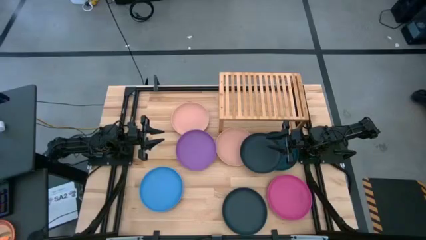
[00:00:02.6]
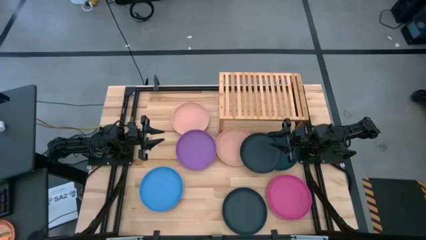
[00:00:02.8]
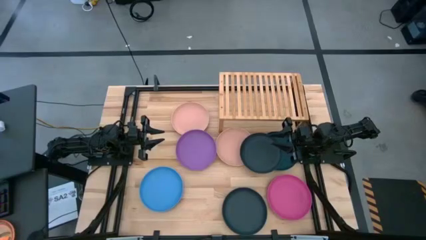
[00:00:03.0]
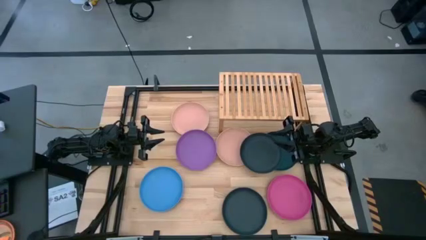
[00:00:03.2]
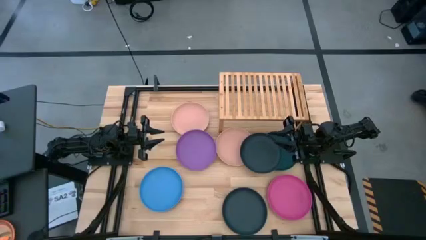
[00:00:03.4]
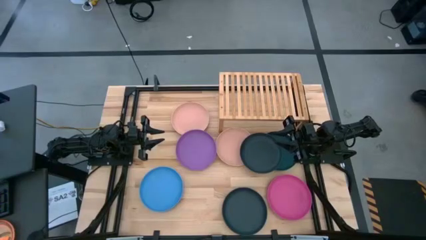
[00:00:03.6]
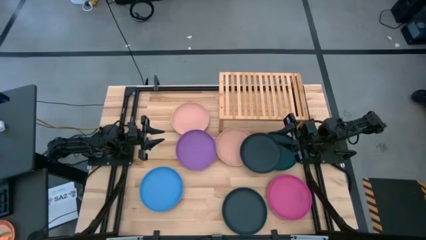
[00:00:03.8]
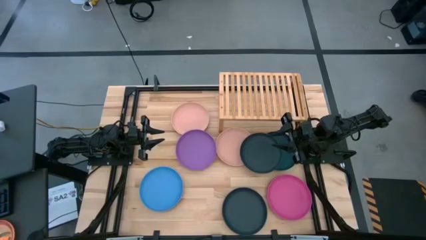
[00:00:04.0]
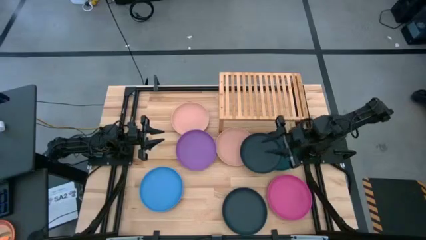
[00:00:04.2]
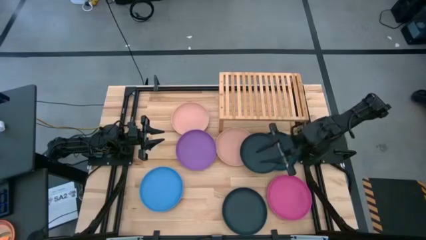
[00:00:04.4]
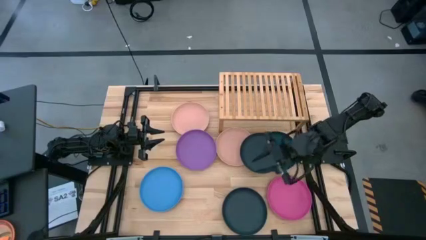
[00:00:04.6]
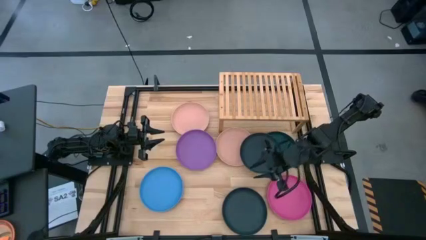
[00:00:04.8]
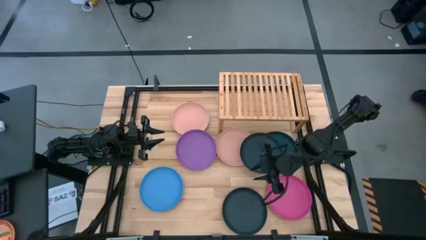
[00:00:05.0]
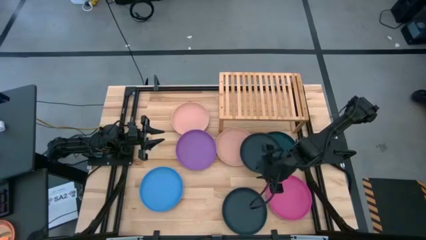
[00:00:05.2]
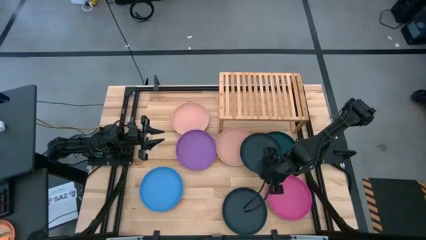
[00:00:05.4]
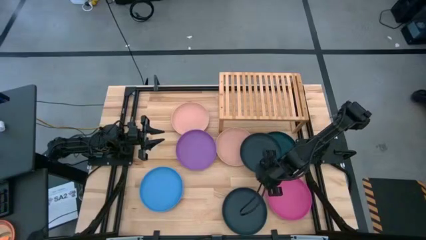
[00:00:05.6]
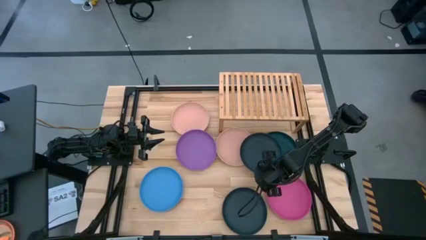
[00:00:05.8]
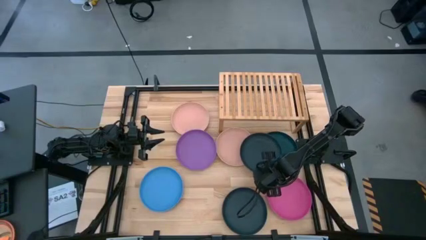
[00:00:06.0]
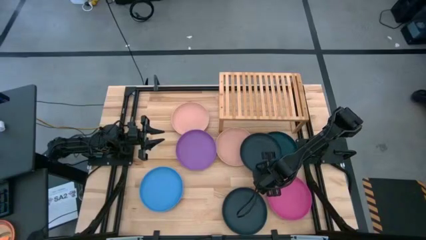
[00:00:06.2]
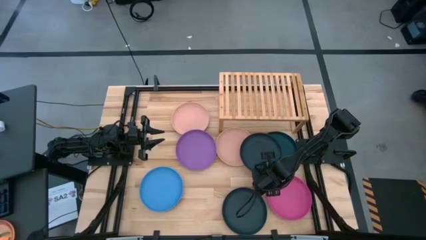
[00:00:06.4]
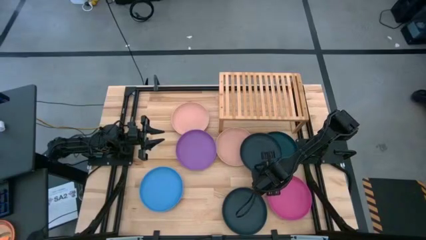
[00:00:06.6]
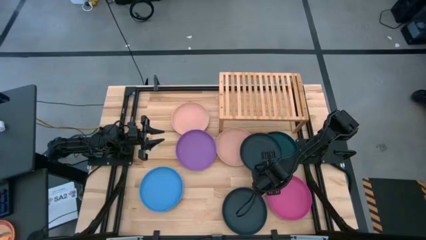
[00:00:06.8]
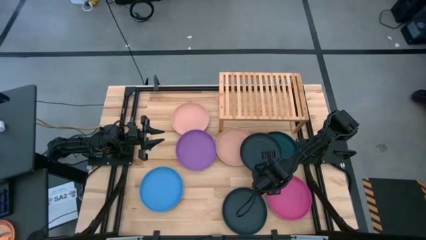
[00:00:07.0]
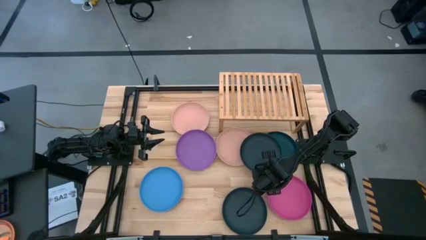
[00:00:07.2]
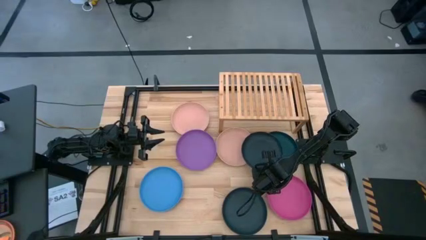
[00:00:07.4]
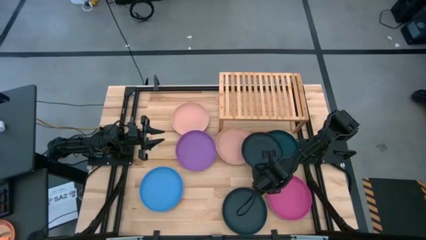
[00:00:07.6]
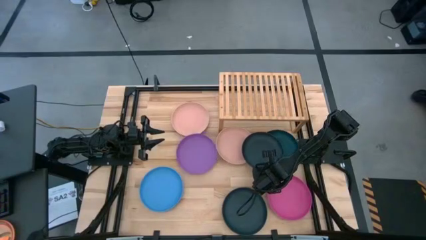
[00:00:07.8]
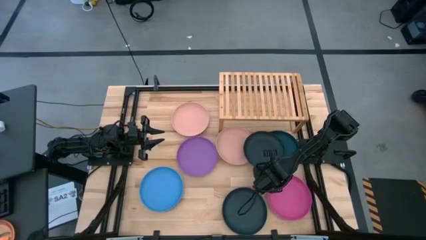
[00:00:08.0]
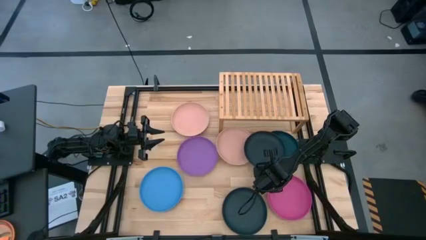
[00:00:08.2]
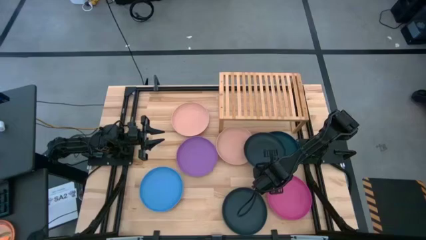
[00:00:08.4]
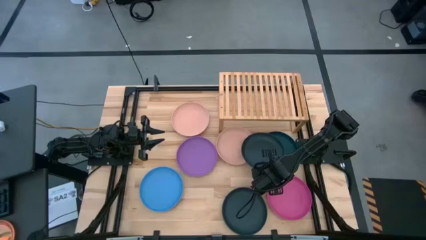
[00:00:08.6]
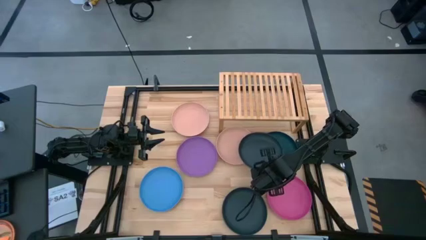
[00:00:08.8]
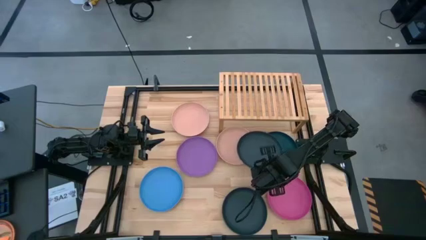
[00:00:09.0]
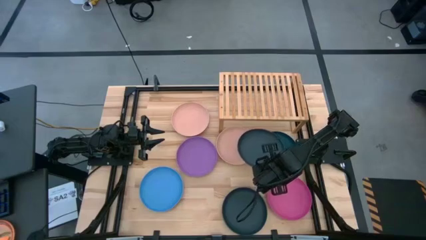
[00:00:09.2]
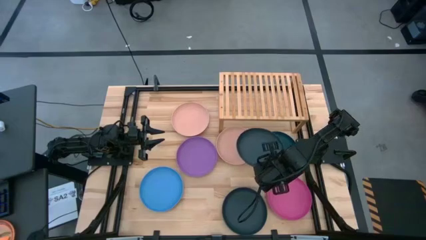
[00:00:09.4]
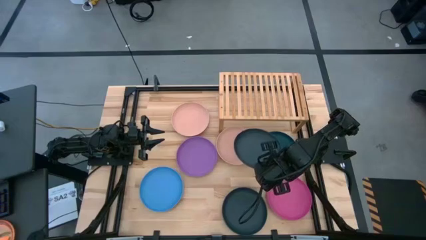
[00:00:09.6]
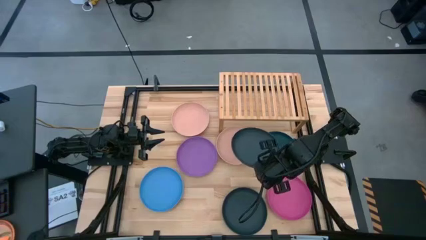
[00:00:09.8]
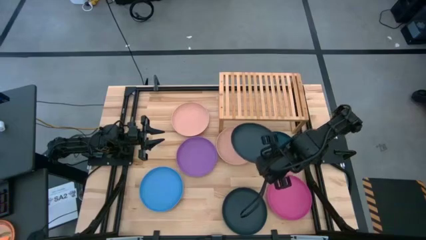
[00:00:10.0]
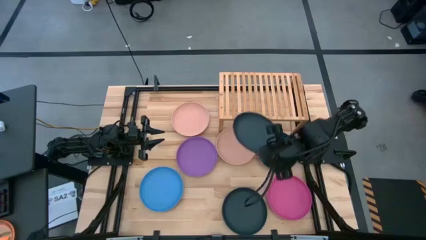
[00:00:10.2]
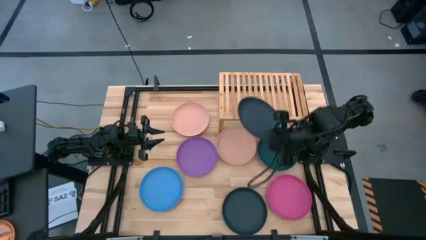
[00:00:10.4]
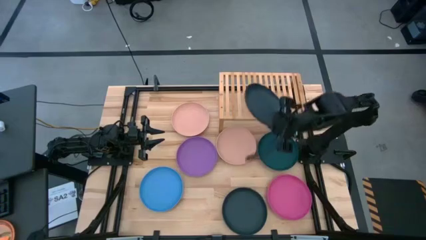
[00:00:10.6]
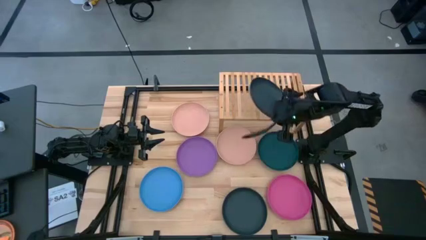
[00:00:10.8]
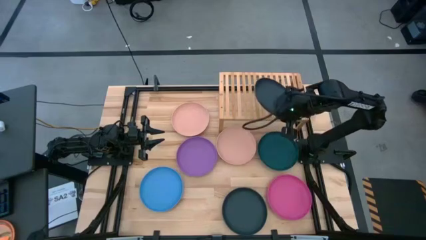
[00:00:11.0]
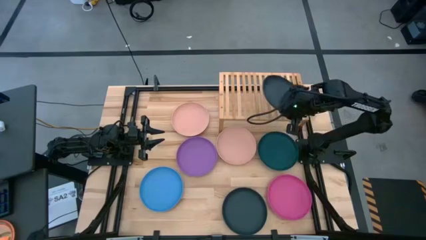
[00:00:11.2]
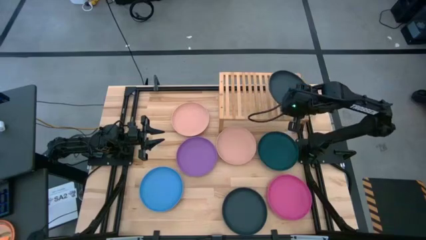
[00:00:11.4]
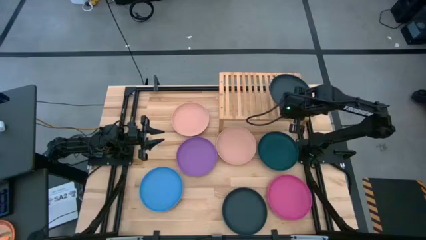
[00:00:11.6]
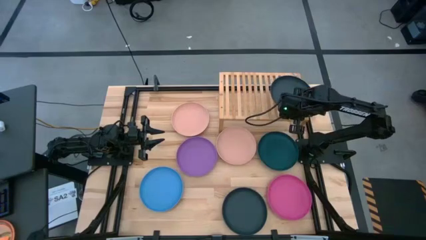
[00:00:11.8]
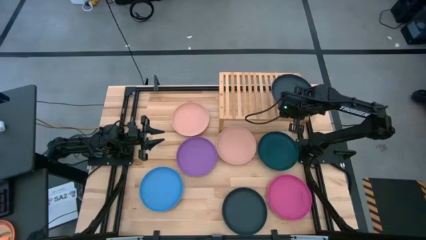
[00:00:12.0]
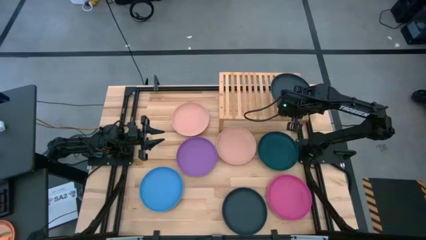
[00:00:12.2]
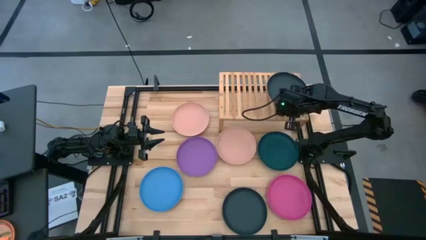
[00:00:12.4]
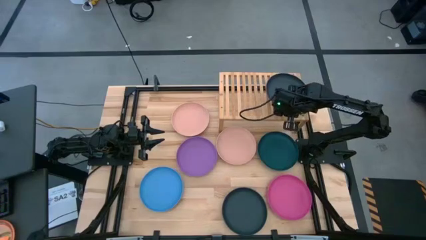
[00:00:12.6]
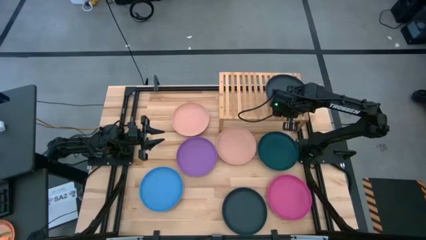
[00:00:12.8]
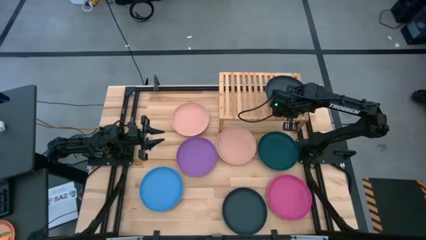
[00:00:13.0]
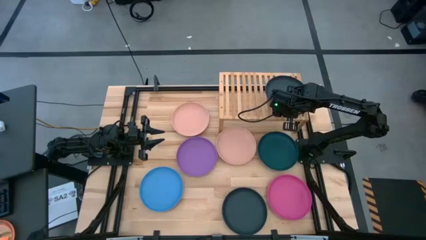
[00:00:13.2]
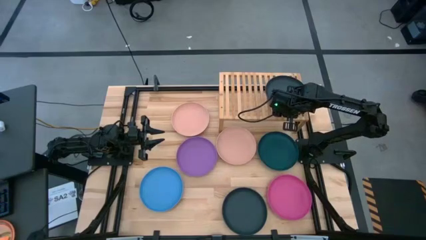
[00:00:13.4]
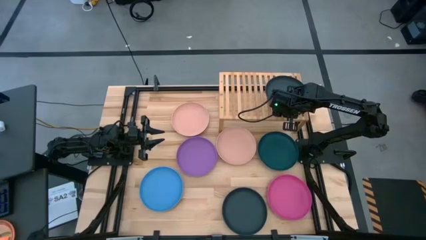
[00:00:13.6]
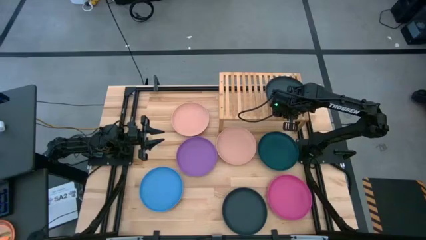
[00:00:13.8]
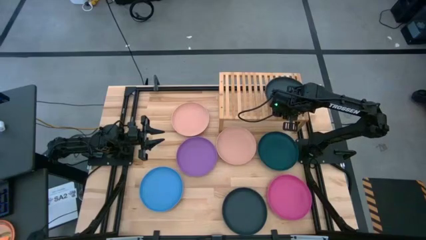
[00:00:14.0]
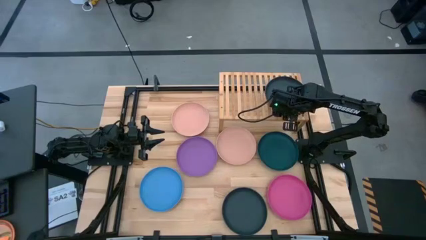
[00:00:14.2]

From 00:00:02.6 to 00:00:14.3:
Task: Place and stack plates onto a shelf
Put the top black plate on the shelf
